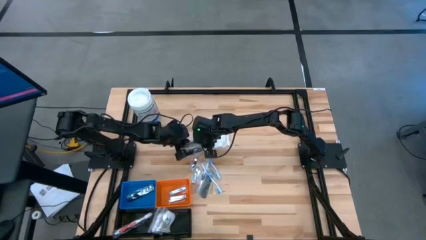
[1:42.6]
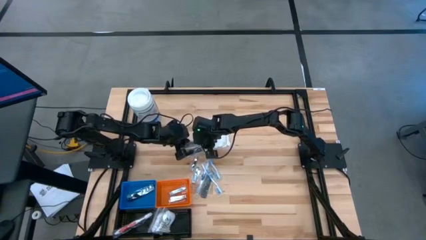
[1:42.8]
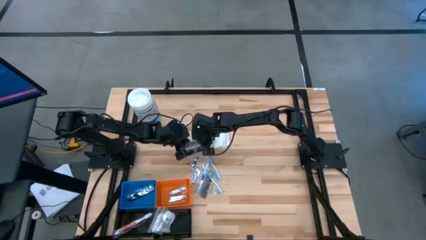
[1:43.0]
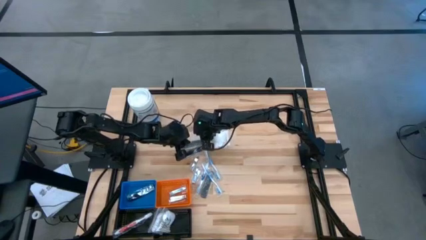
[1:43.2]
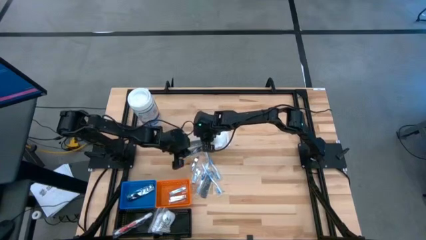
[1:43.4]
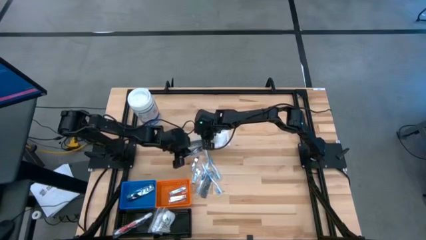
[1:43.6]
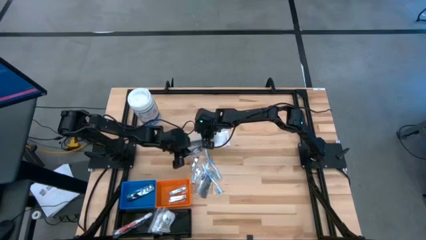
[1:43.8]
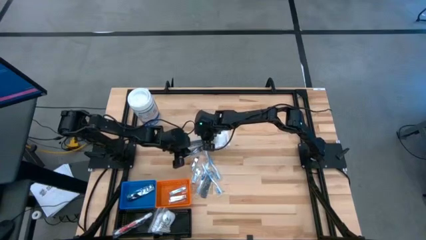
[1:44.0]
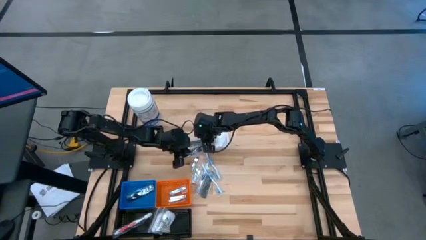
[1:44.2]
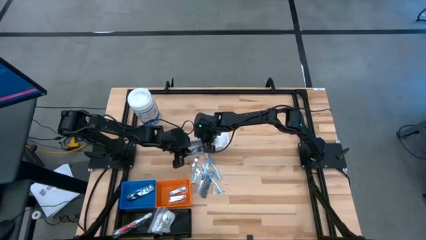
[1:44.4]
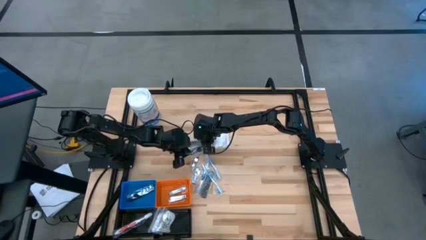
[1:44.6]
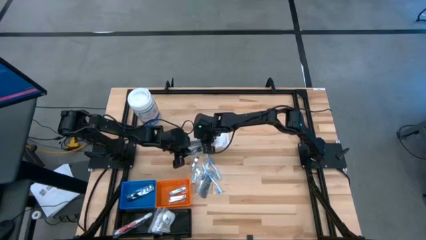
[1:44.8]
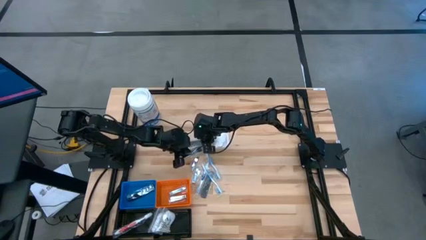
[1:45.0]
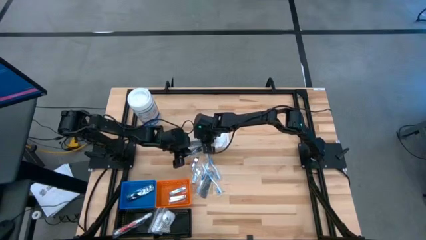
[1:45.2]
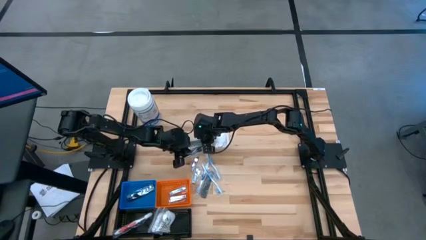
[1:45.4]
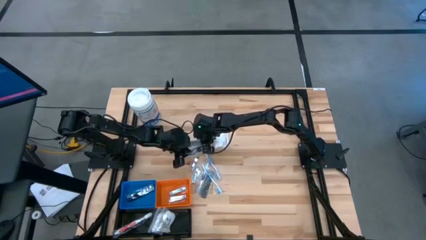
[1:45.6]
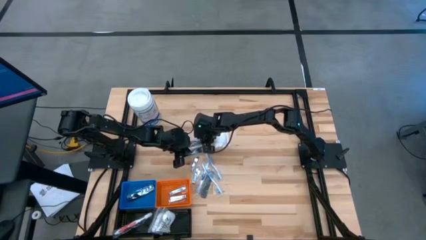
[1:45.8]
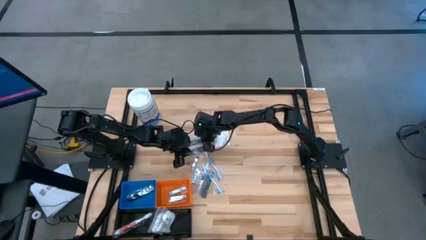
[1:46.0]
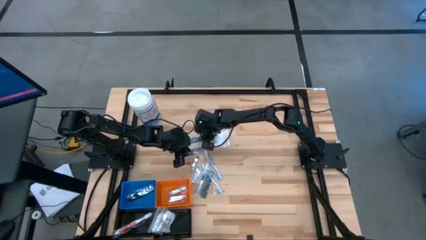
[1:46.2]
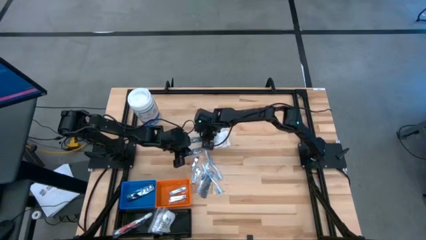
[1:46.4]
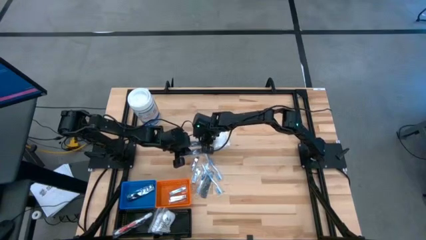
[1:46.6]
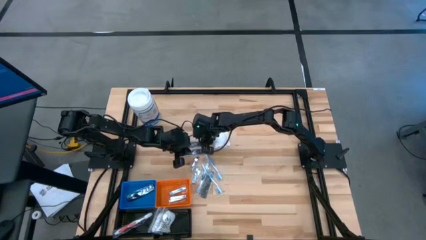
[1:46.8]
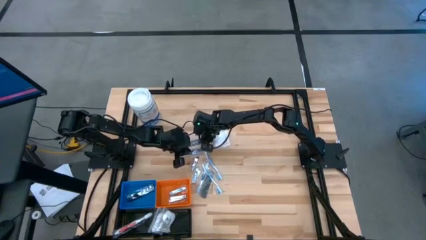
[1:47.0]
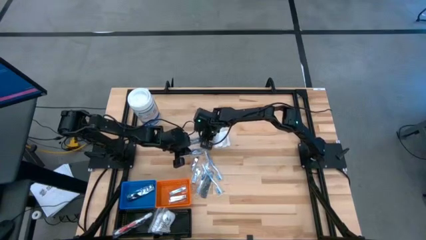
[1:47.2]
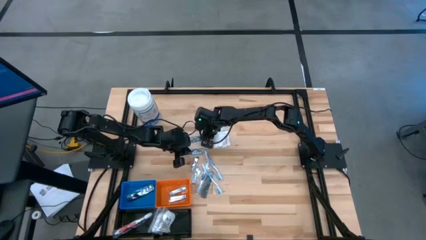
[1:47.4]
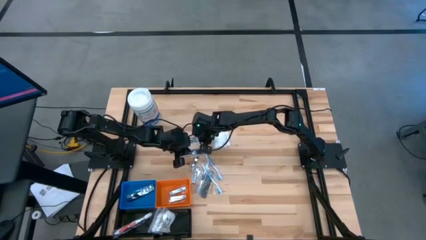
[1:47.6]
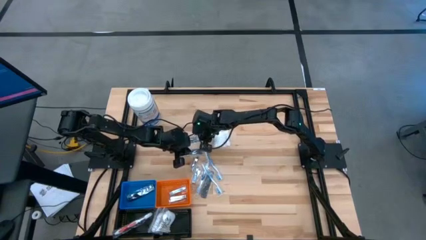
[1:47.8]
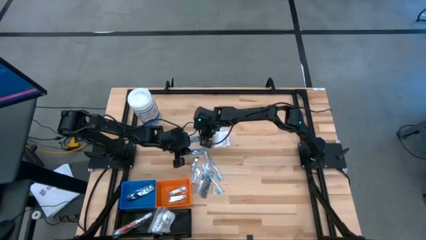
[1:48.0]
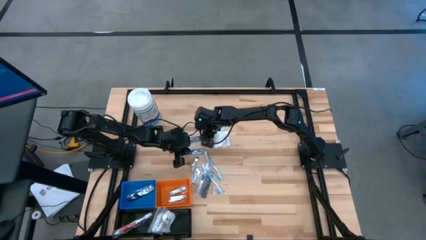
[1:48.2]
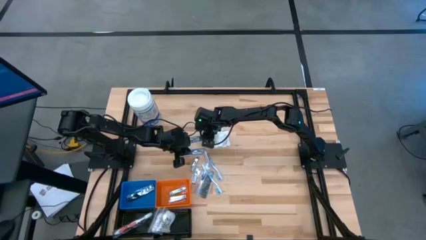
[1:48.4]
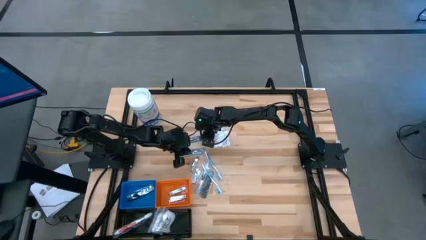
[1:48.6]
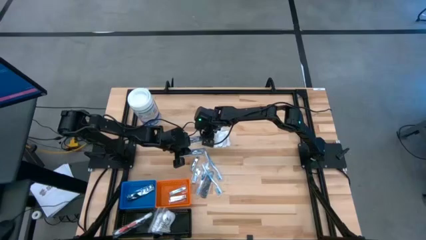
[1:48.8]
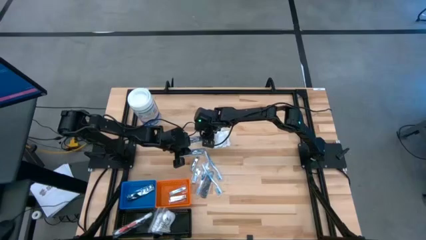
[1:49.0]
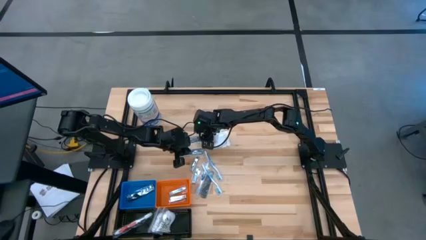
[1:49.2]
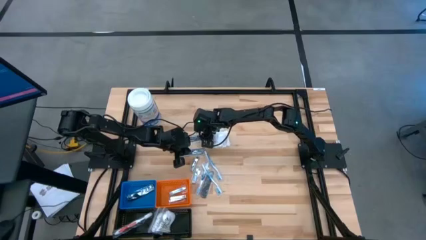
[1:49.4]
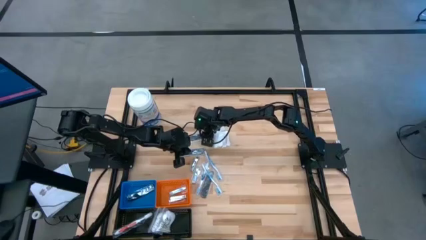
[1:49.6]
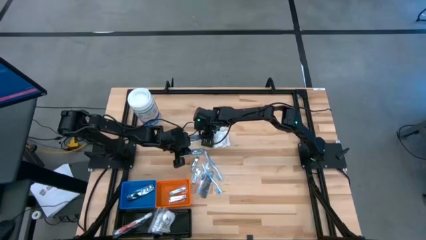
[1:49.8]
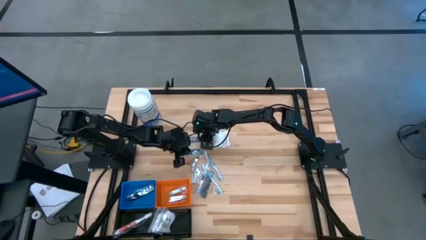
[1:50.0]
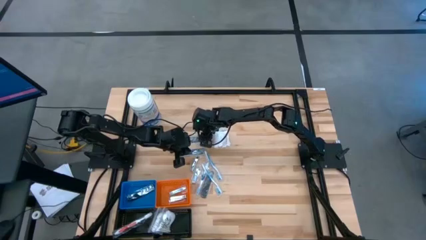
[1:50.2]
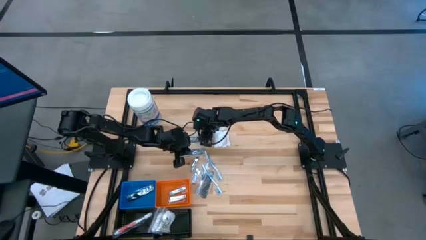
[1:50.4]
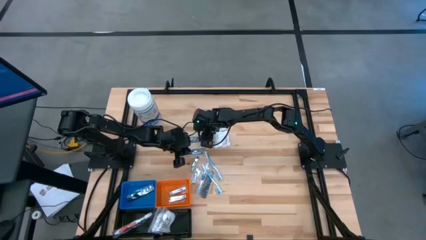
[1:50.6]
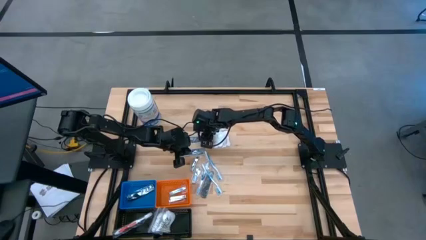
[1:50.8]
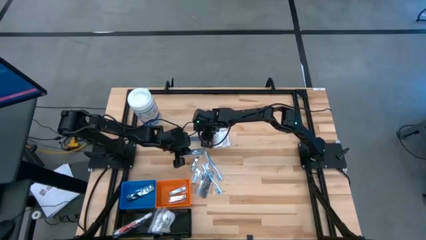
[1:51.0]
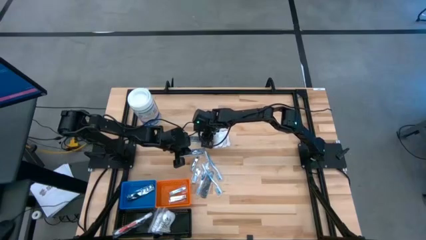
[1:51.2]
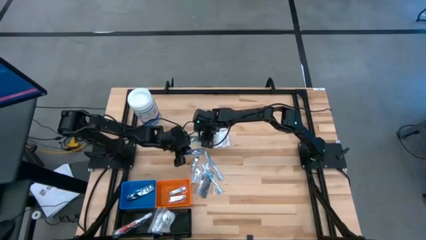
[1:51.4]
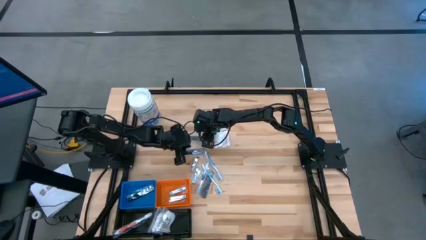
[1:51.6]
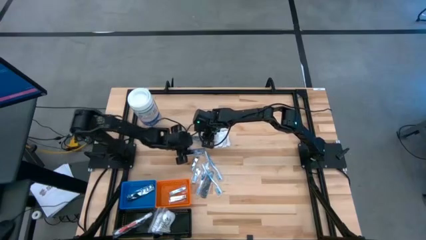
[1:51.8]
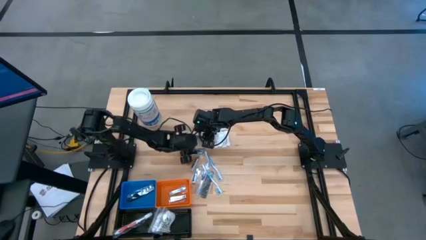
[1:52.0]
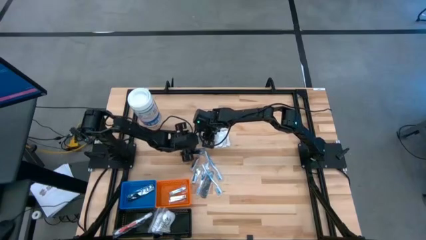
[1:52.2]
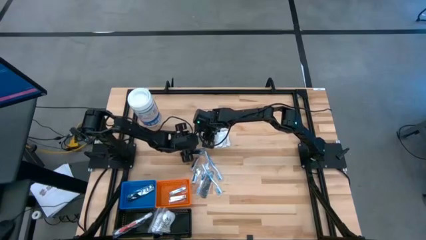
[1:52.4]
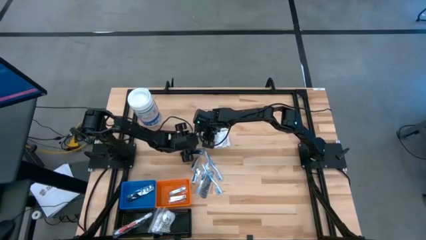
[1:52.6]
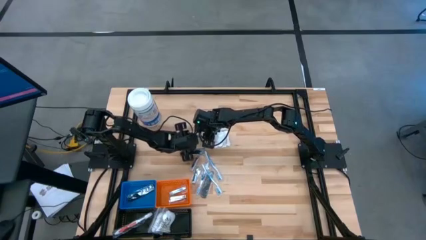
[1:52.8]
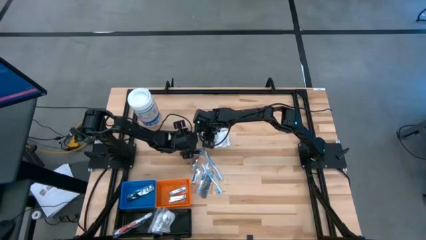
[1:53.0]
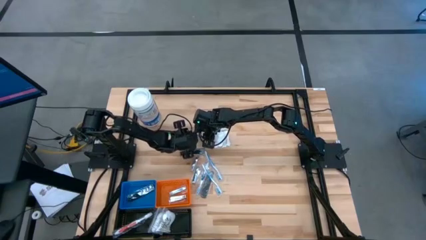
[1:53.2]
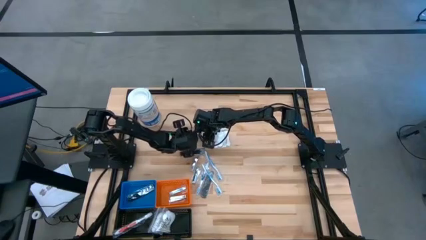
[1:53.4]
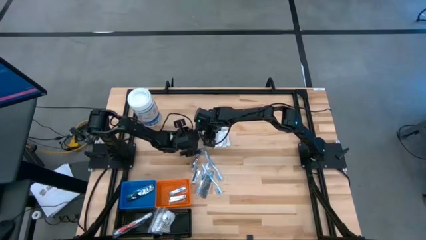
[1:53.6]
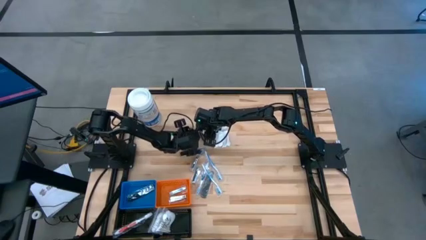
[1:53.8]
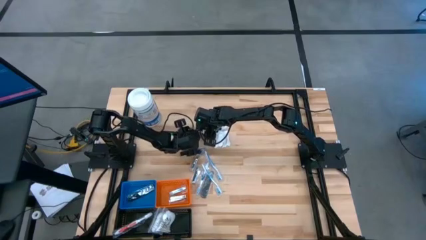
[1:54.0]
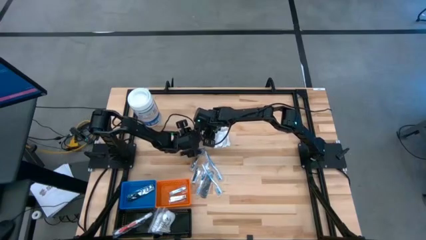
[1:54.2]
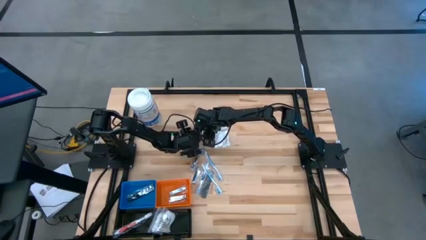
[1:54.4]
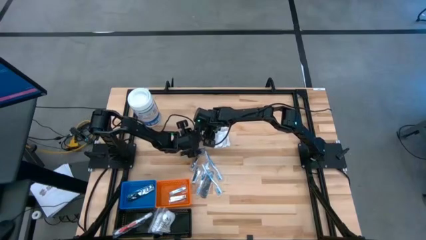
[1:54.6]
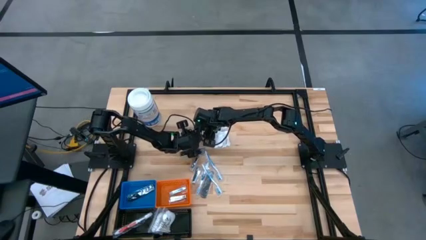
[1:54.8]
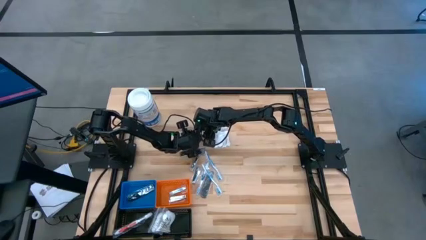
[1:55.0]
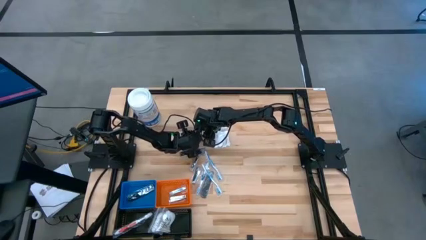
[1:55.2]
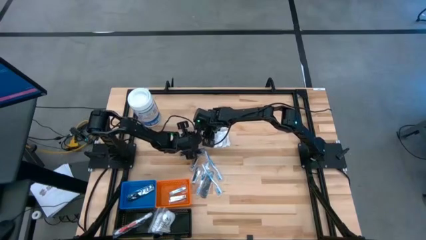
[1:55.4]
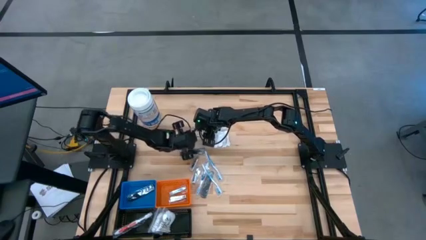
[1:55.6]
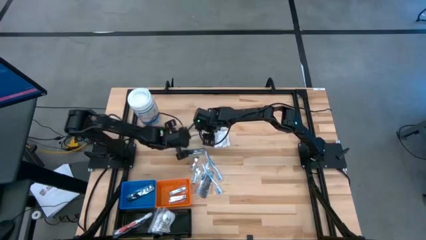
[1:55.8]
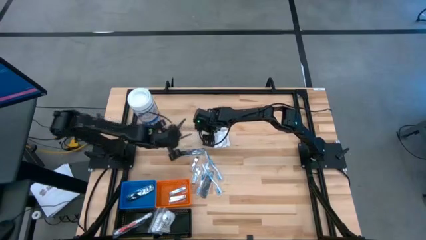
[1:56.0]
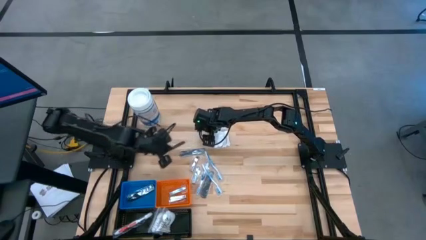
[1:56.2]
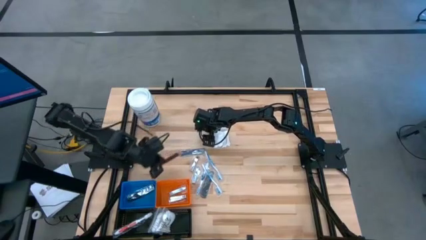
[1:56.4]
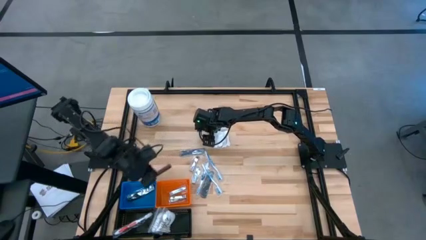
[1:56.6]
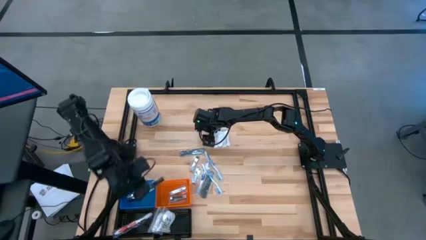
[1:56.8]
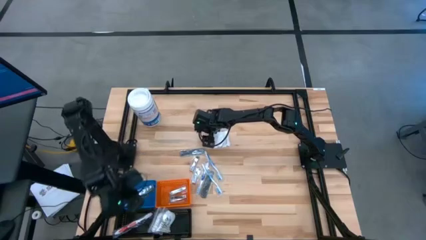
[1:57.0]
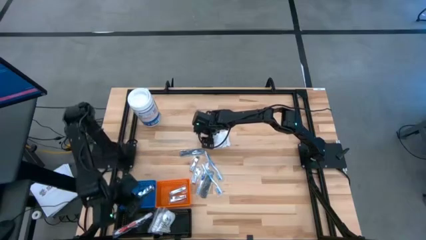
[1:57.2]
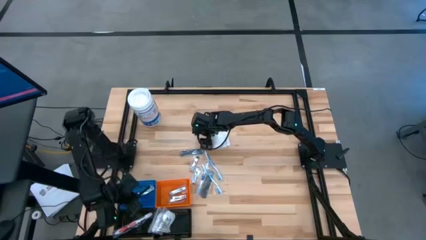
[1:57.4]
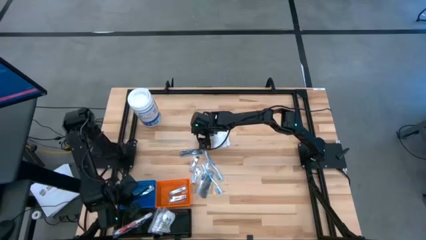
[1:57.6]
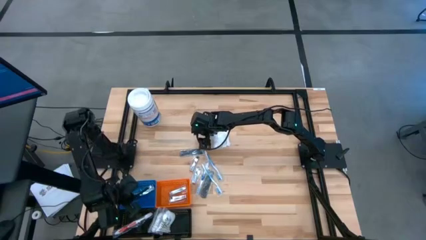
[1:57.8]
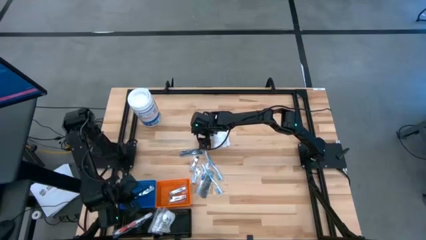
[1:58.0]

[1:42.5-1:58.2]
Task: Pick & Place Travel size toiletries
Put the top black comb into the blue basket

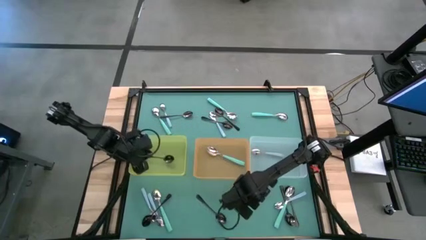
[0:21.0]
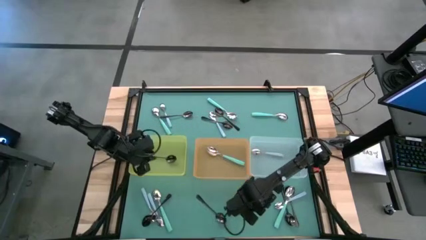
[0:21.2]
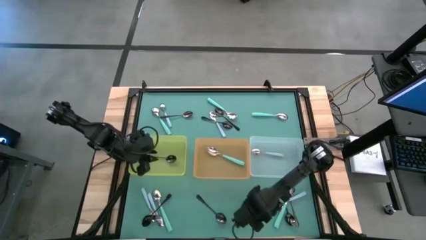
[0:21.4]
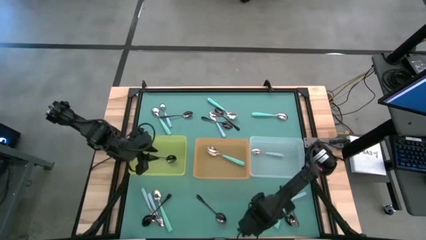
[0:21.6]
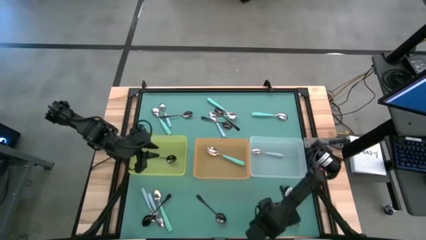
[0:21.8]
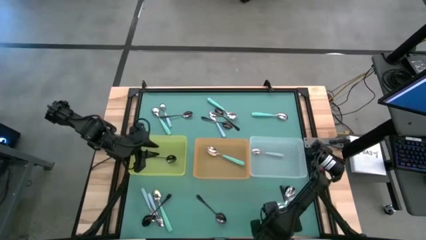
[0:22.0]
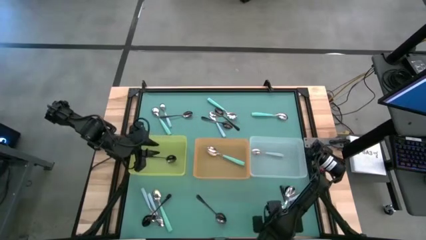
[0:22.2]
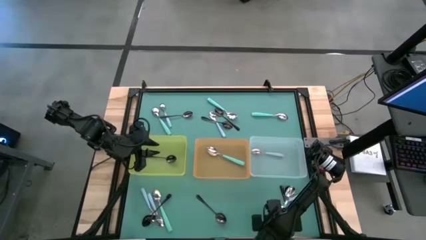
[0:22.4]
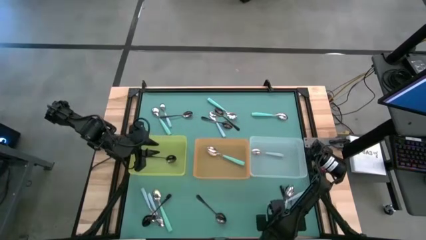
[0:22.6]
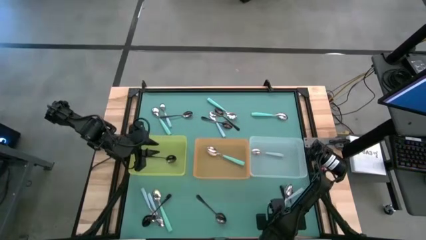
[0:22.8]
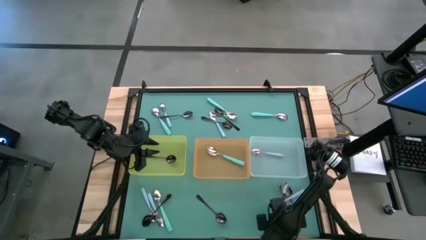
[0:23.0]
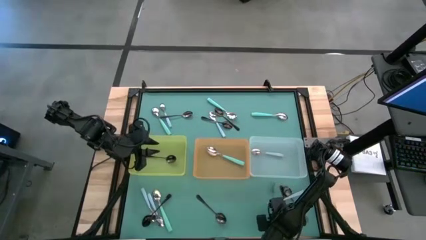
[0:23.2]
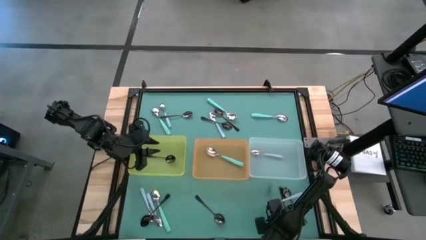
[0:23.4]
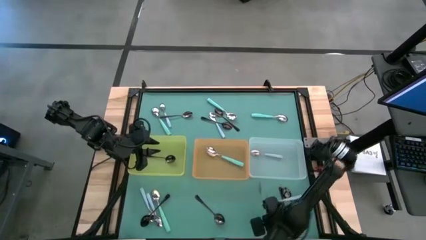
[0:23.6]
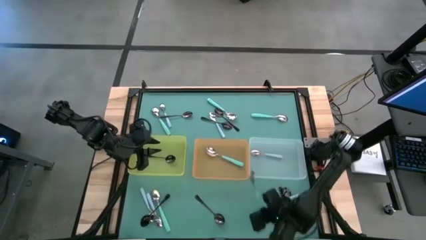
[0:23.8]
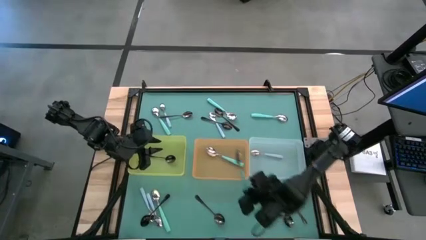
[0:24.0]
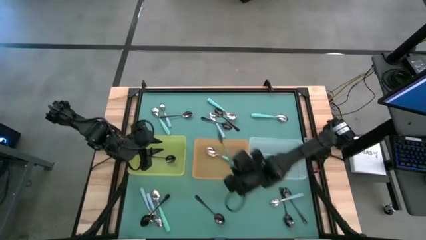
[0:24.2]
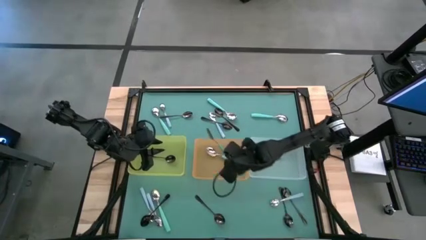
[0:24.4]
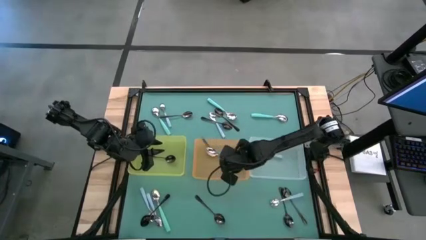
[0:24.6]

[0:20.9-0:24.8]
Task: Sort silverware by color (type)
Put the green spoon into the orange bin
